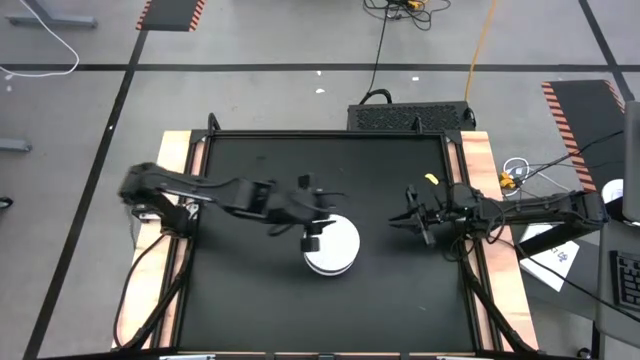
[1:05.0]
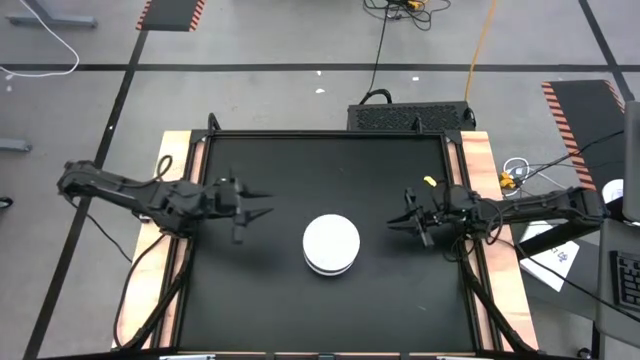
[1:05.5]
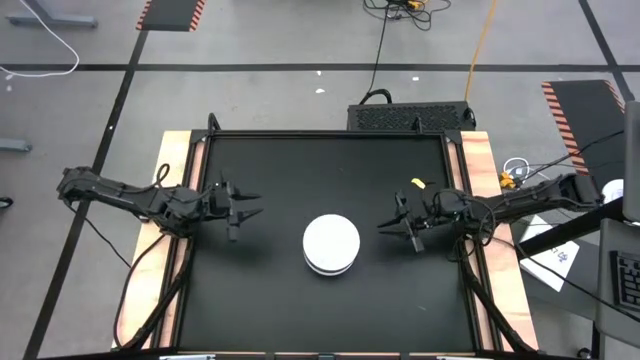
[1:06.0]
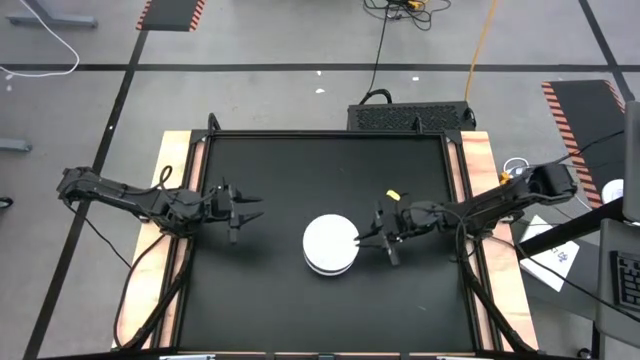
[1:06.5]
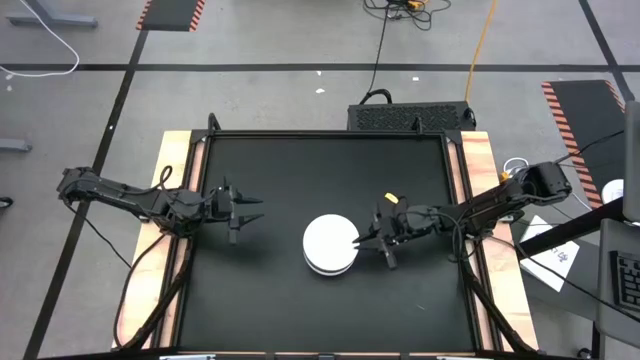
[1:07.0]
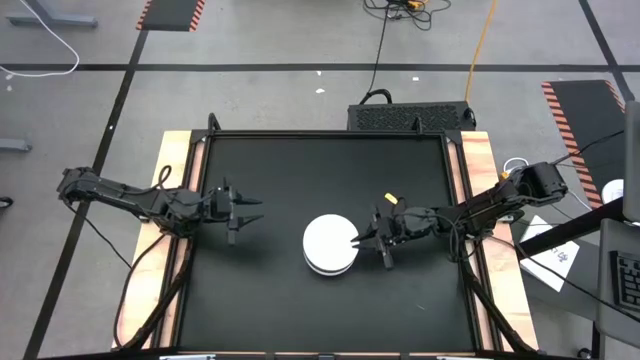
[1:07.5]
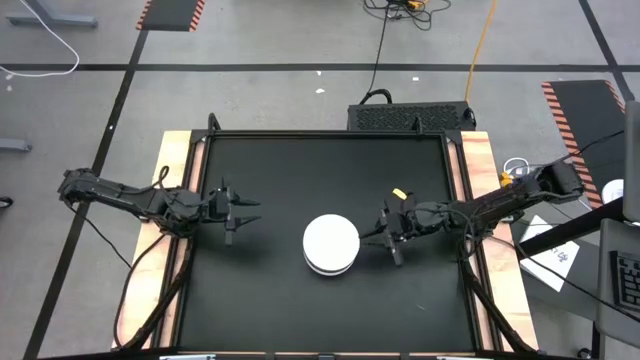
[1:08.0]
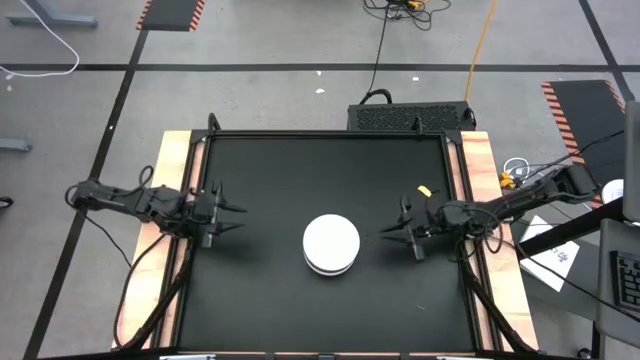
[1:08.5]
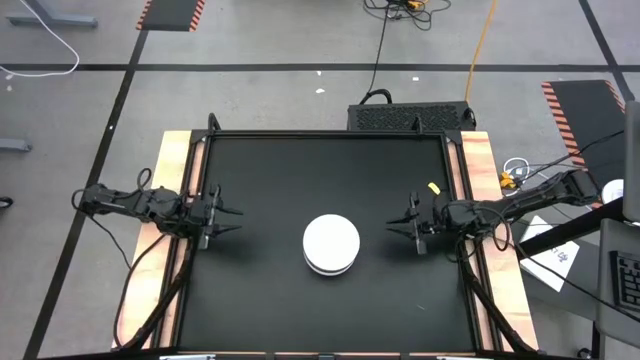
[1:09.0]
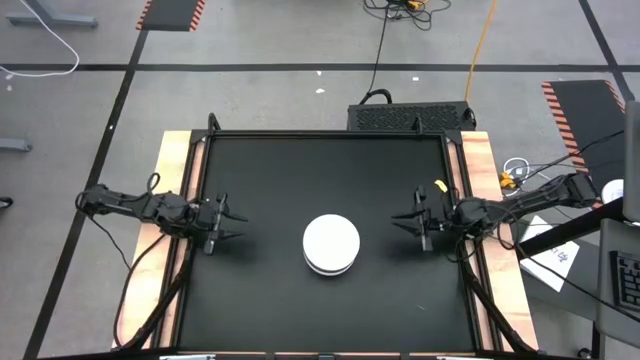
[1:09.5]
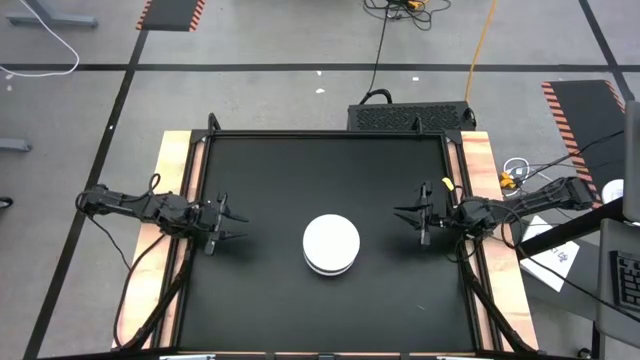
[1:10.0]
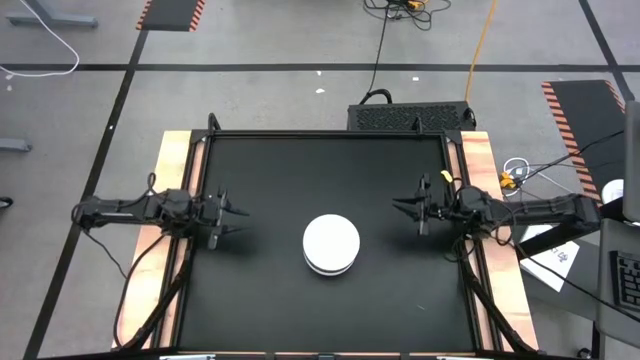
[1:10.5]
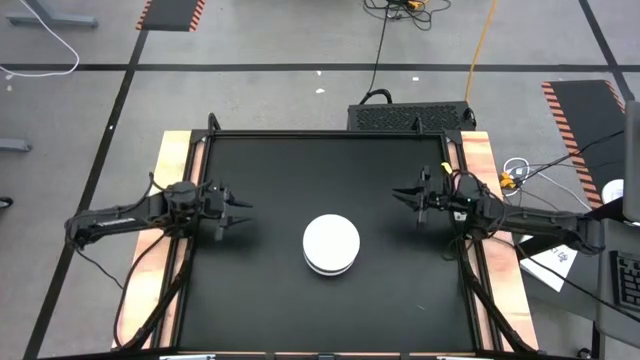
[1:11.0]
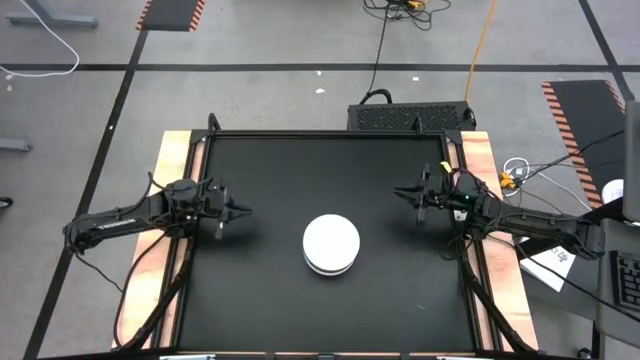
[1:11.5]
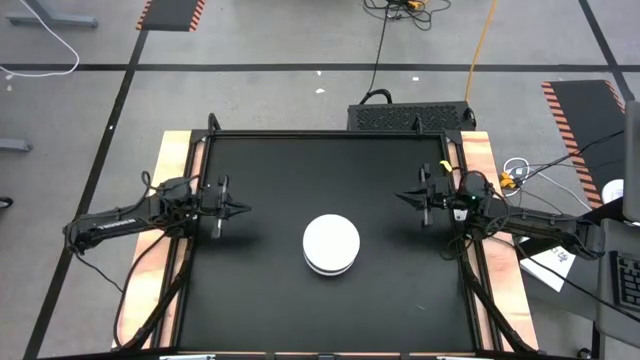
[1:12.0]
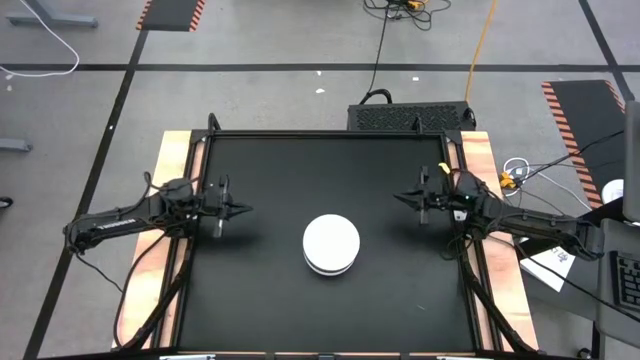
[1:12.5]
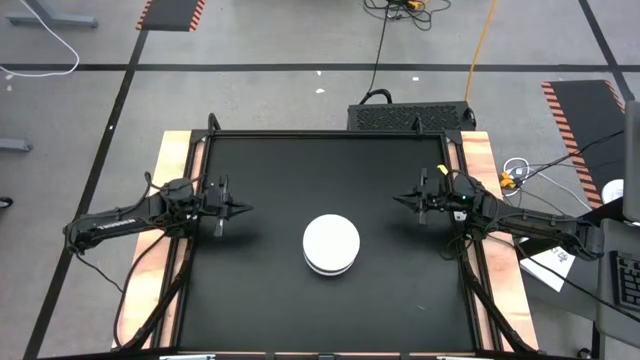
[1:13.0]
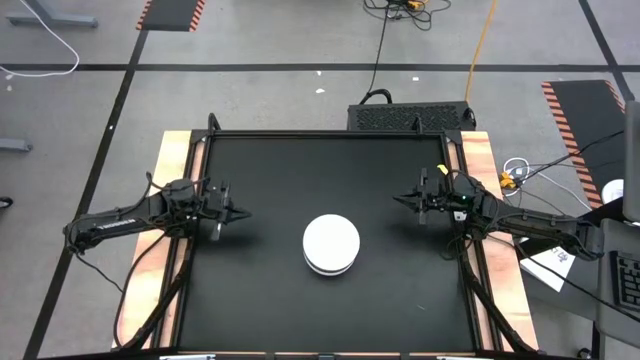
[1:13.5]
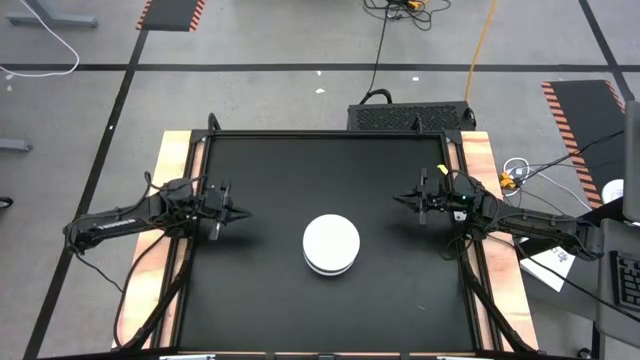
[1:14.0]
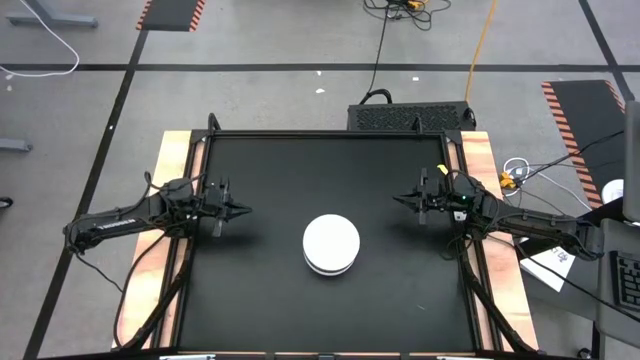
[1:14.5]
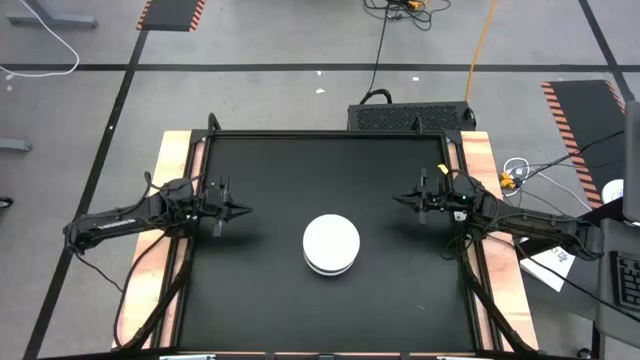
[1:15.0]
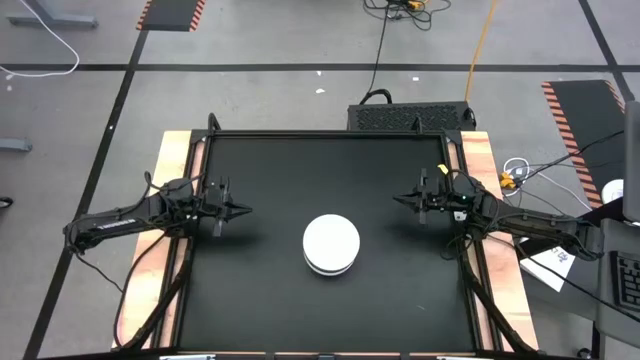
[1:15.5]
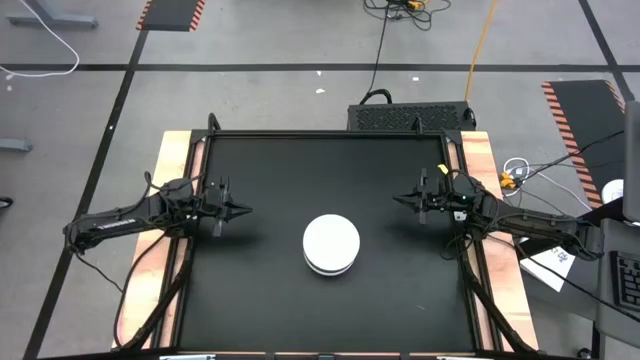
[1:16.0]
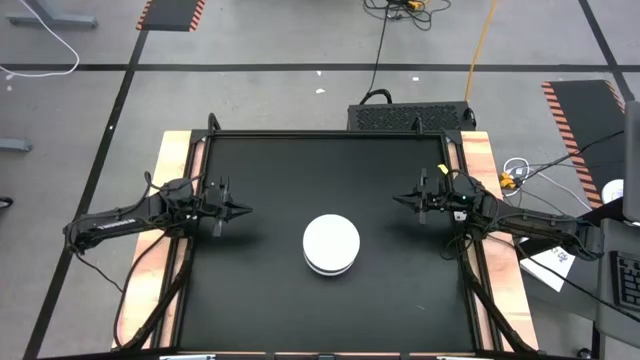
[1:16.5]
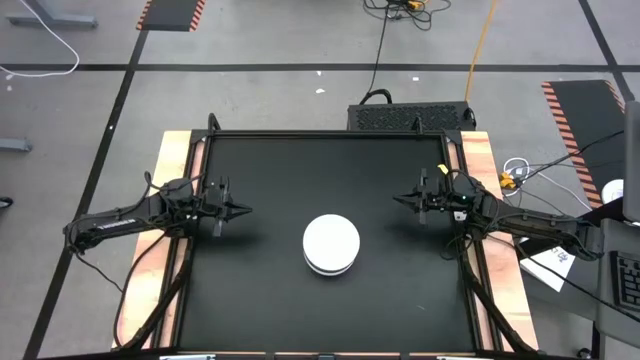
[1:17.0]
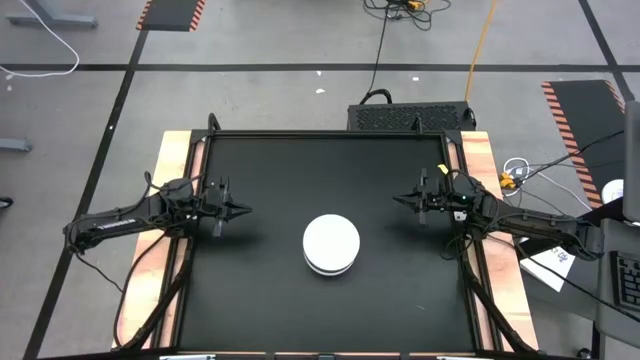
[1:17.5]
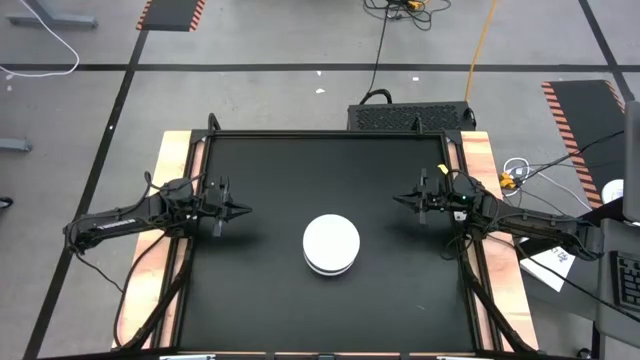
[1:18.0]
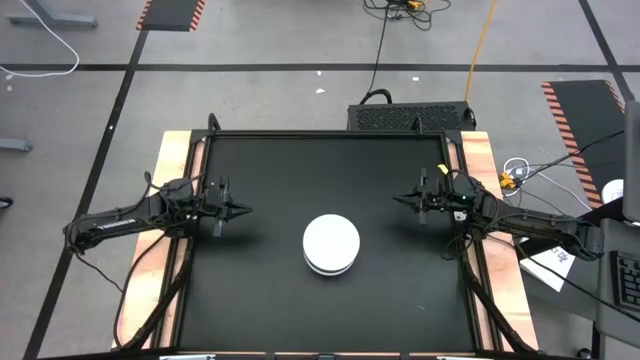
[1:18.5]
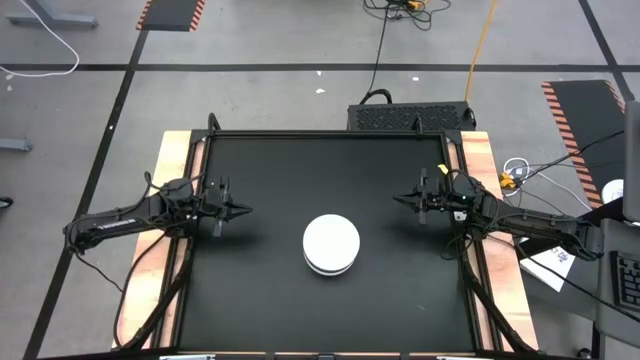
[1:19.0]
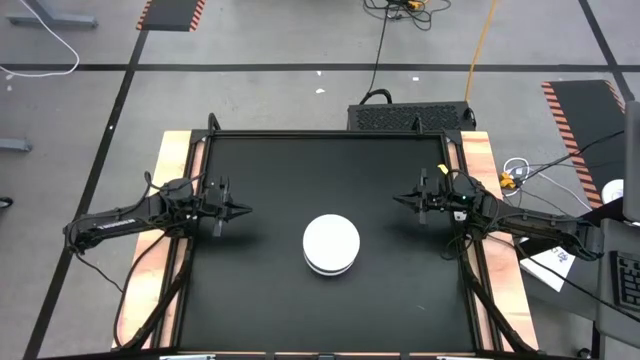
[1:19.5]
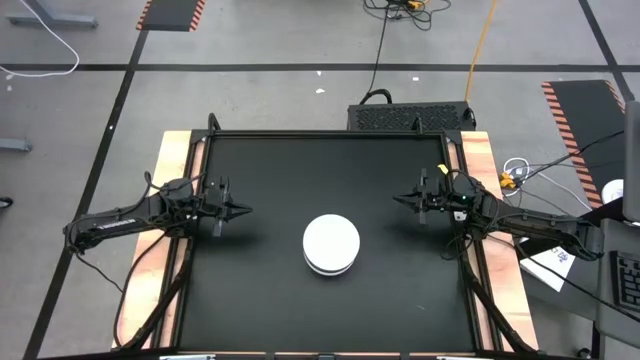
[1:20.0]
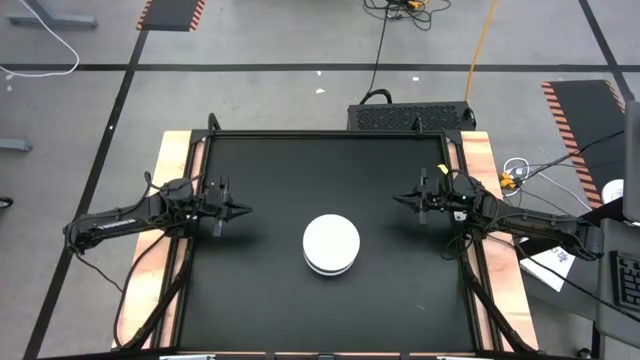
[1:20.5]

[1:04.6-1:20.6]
Task: Nest bowls inside each other
Return to Home Position

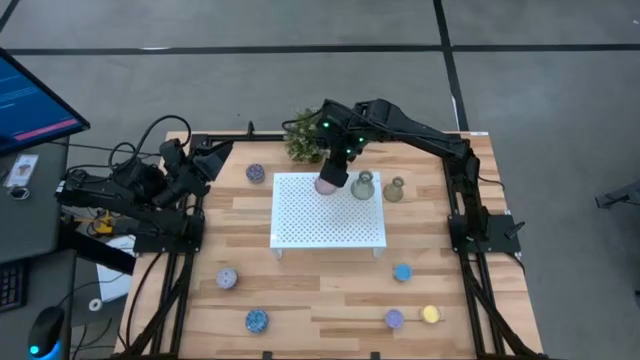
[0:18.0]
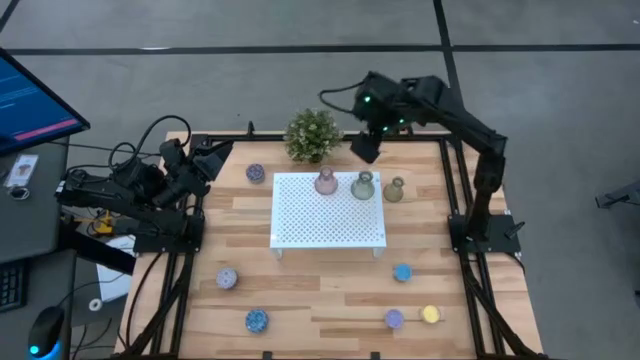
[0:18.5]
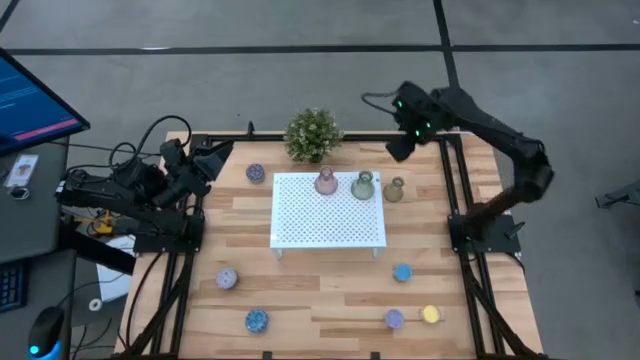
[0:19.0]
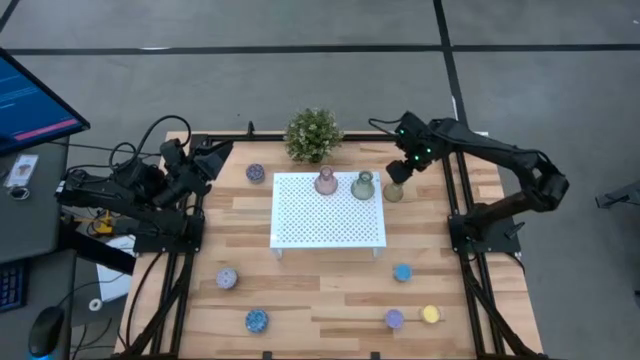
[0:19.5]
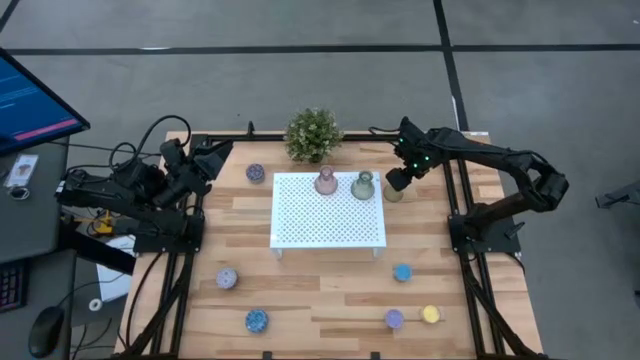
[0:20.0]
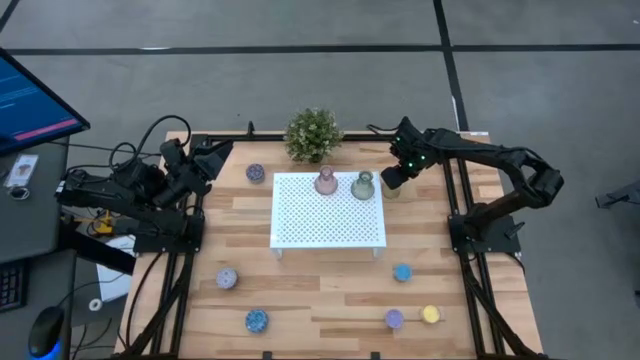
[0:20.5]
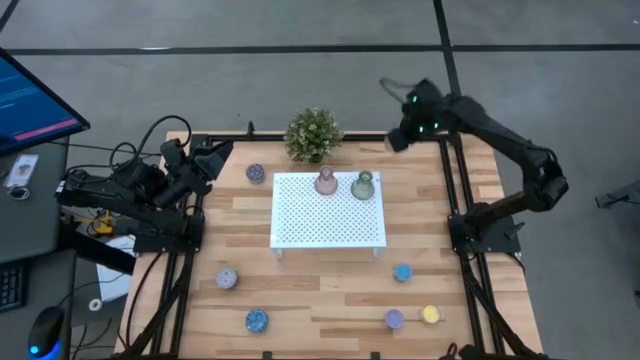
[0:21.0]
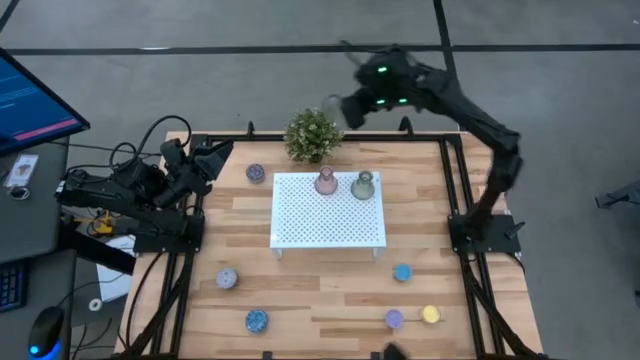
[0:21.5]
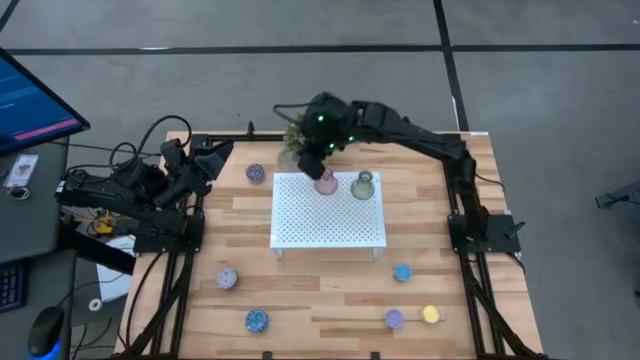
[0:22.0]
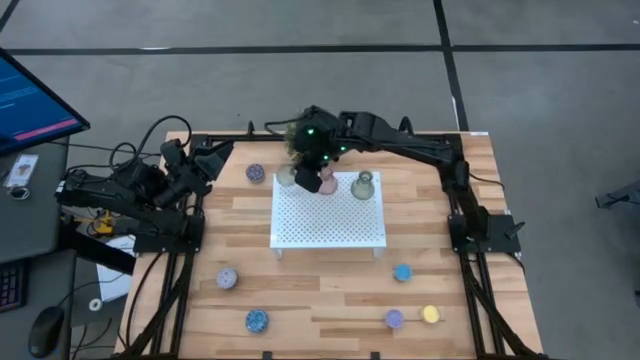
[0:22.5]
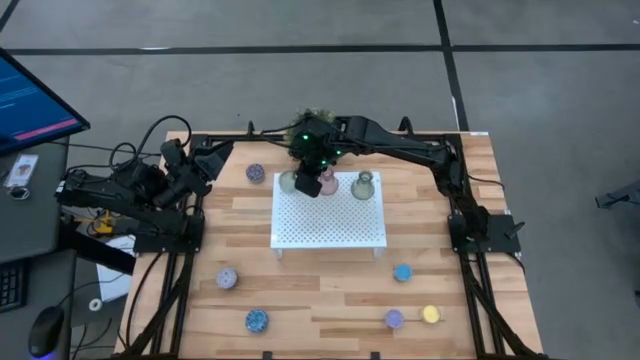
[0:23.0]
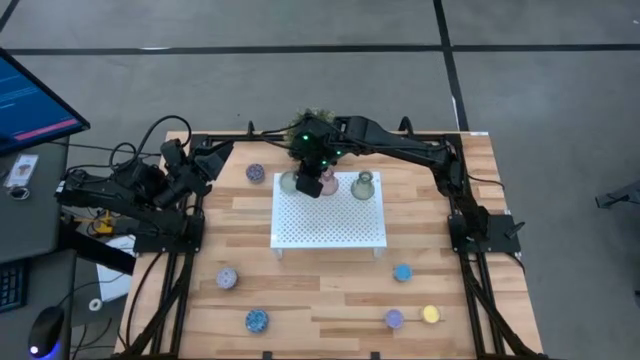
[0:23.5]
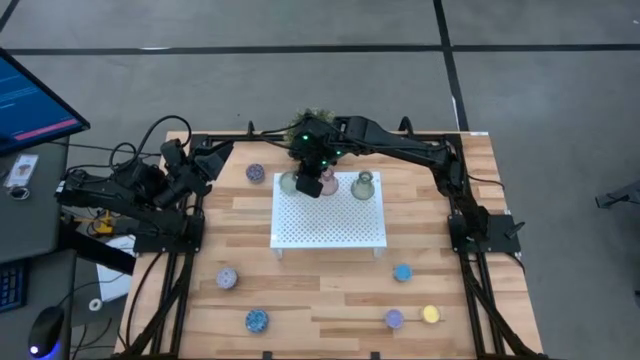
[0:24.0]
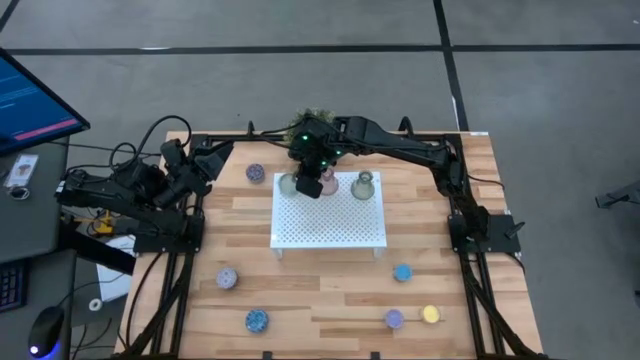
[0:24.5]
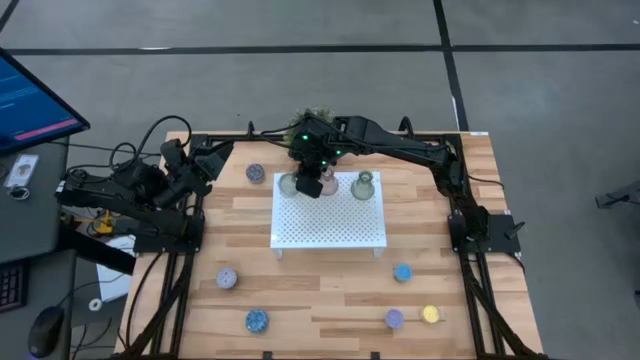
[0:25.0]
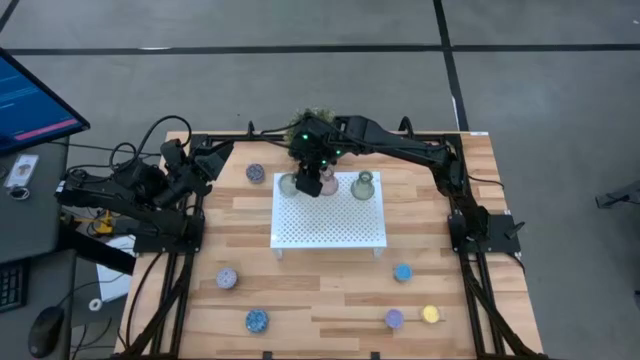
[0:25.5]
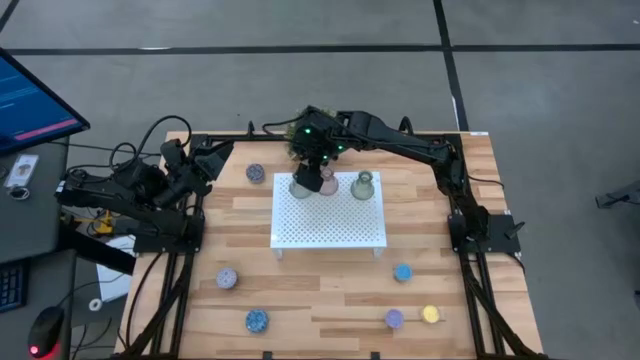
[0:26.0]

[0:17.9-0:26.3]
Task: Pick & Place candle stick holders
Put the green glass candle holder on the shelf
